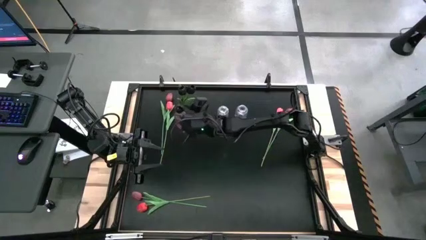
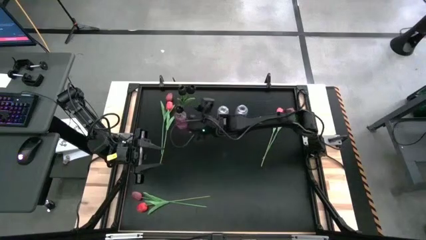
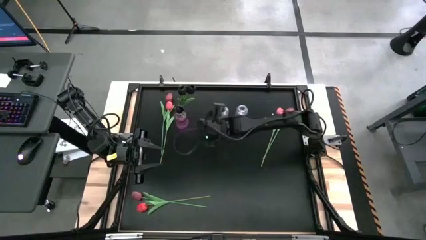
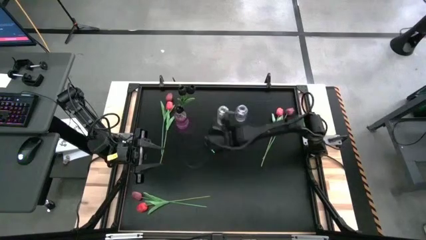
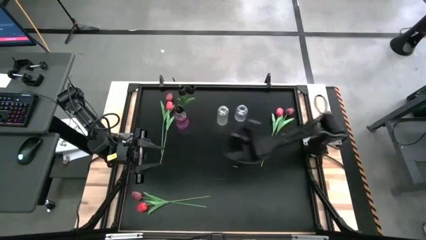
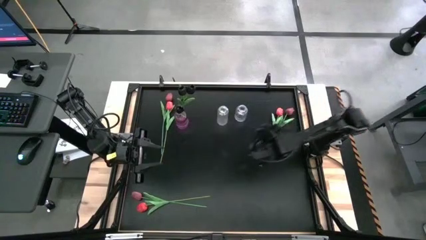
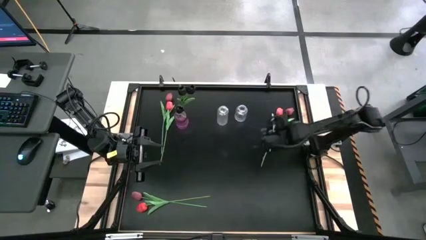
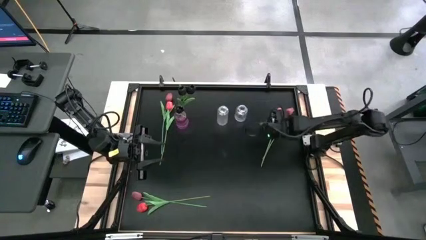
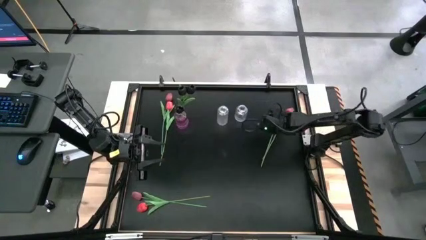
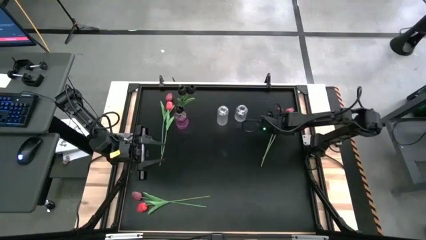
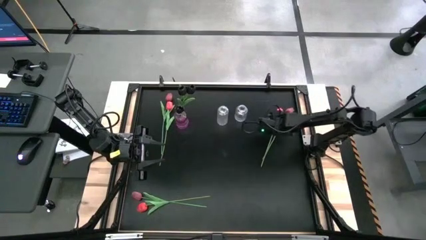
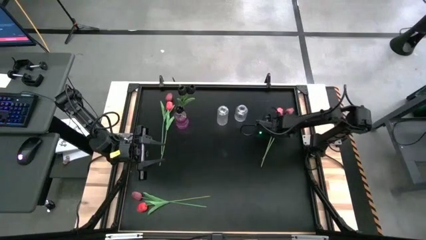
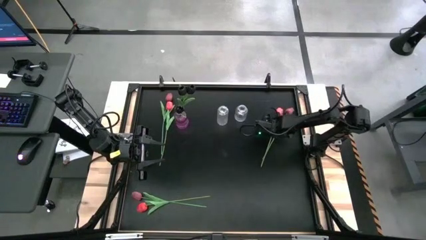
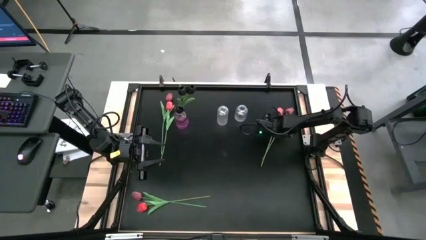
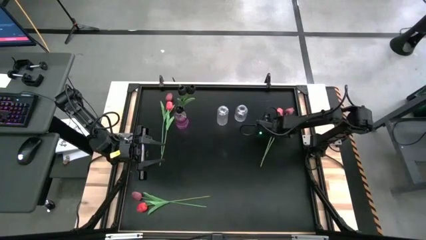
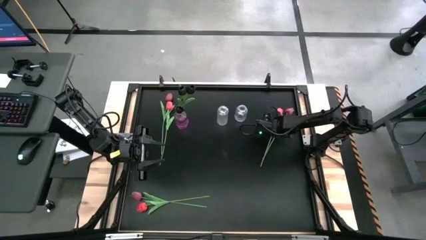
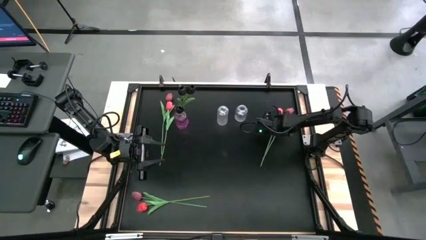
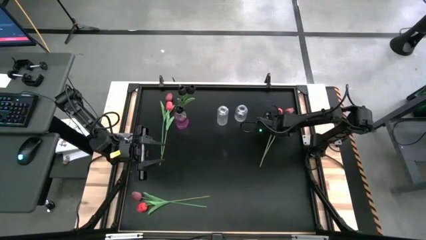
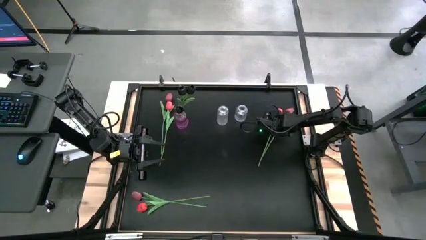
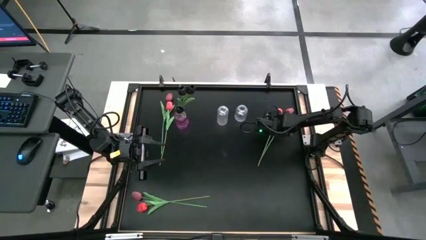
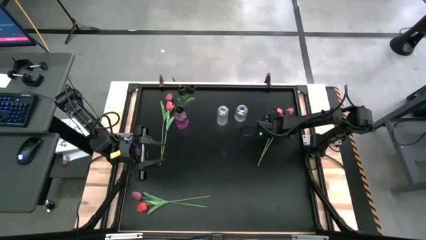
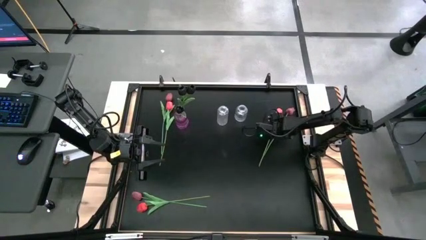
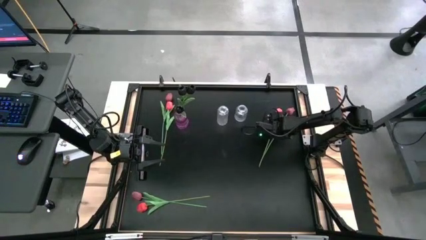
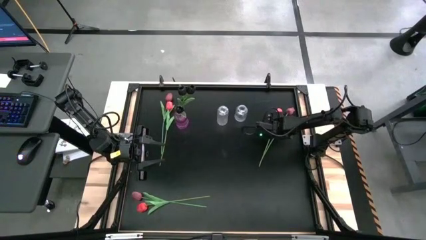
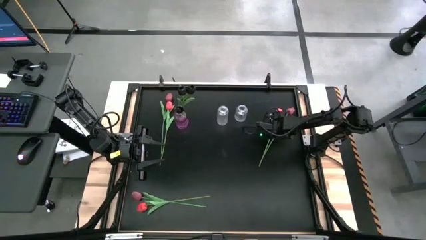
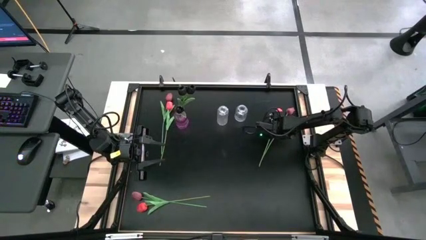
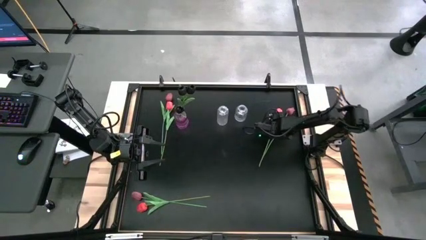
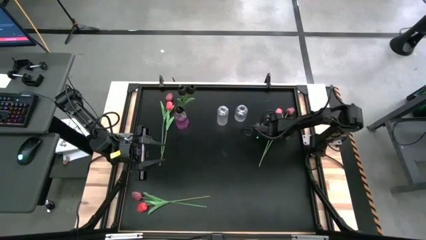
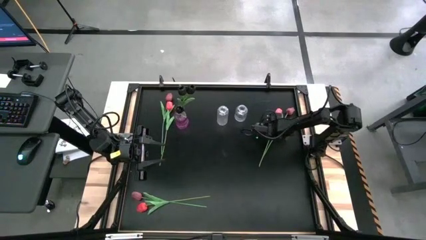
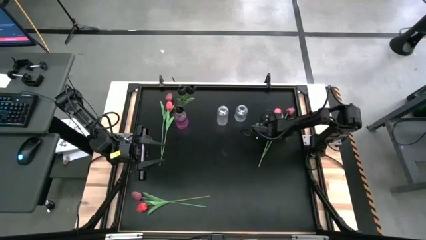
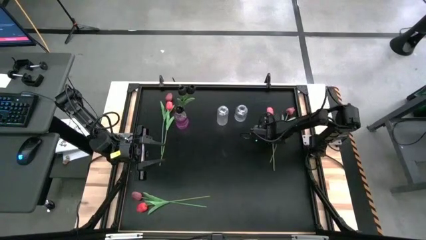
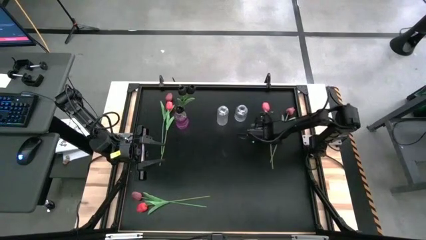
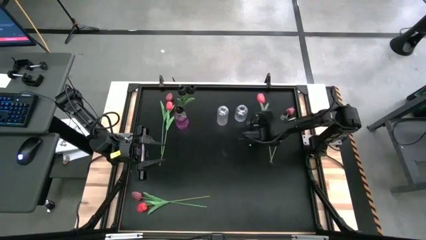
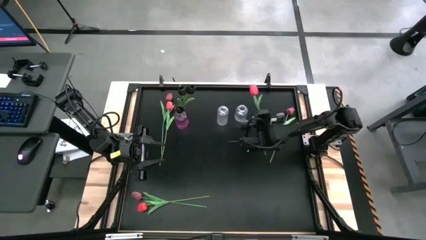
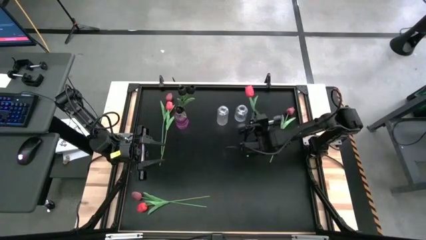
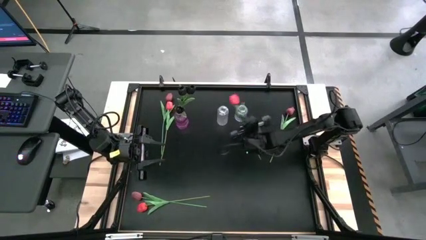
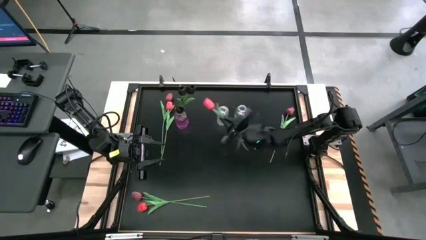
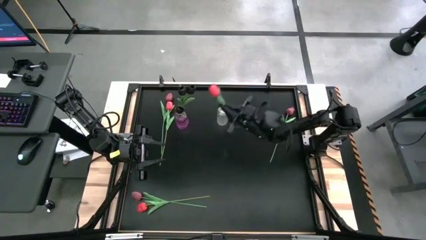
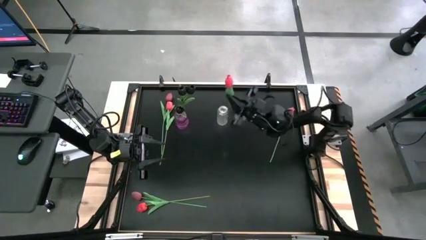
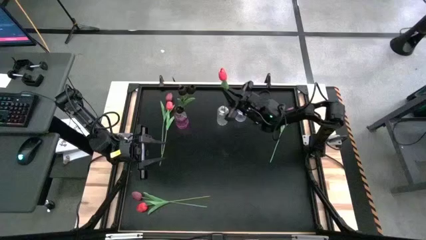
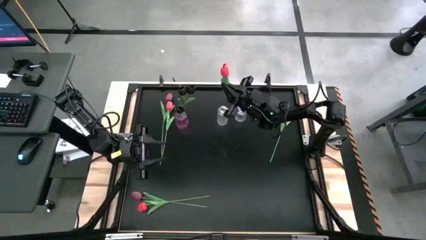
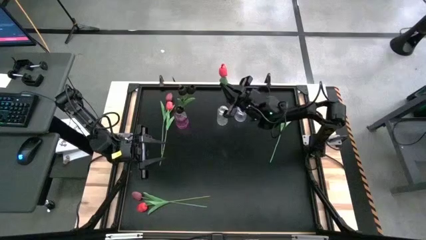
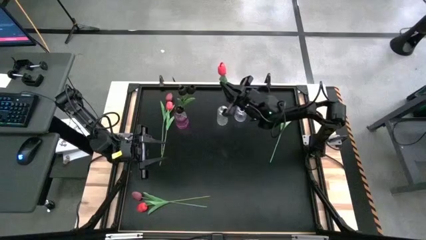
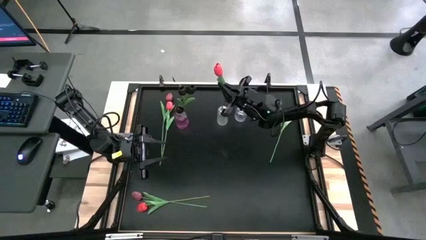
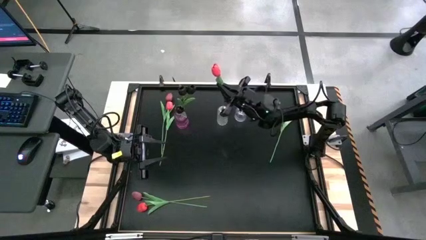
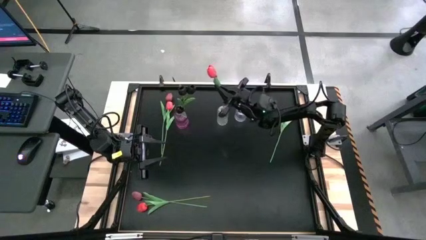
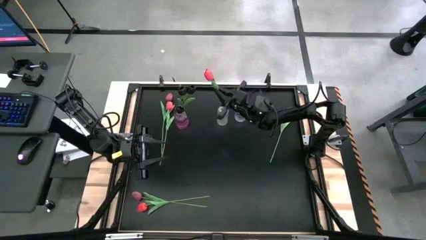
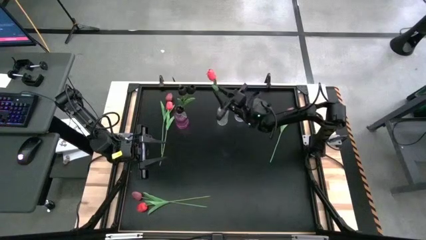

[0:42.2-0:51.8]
Task: Sort flowers into vase by color
Put the top right pink flower into the left transparent vase

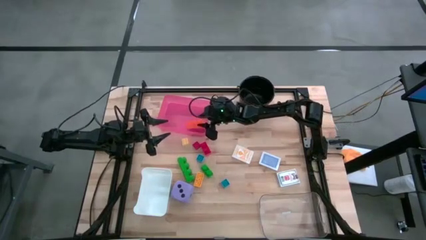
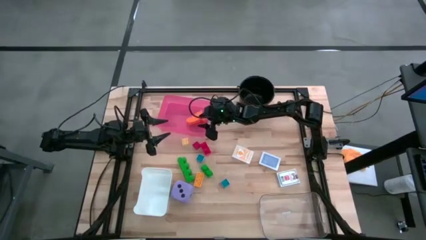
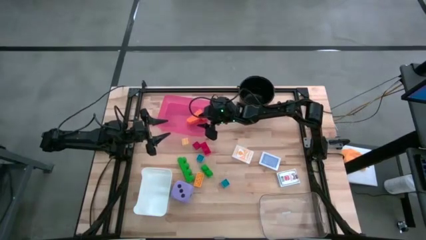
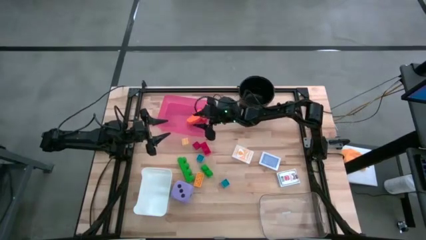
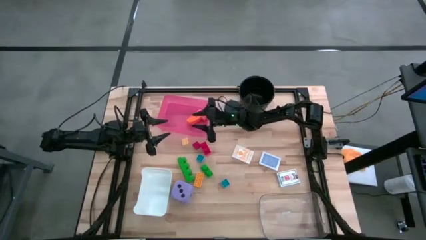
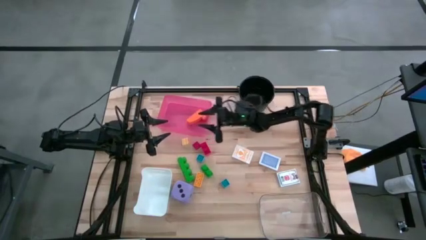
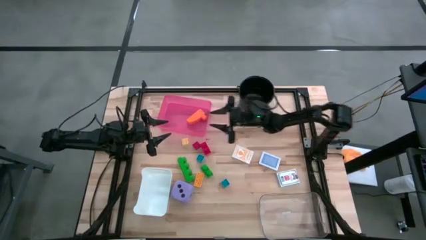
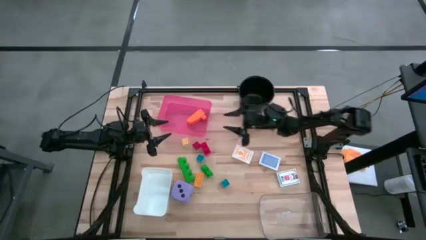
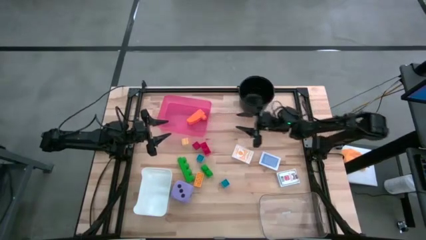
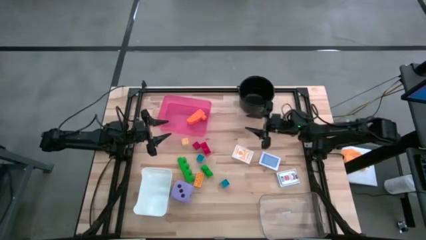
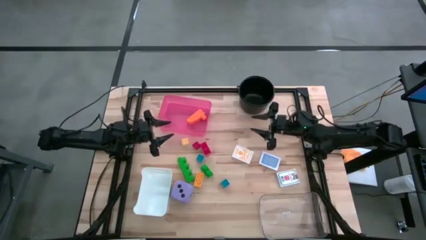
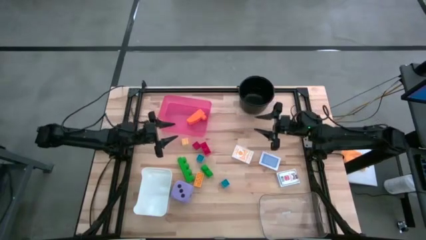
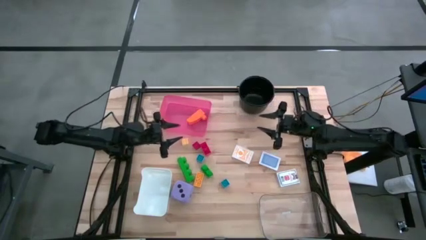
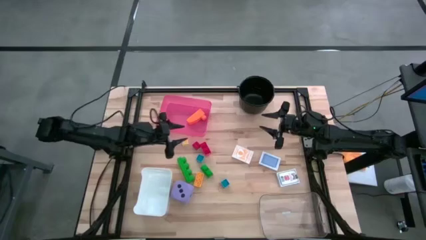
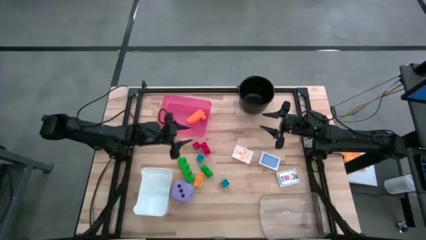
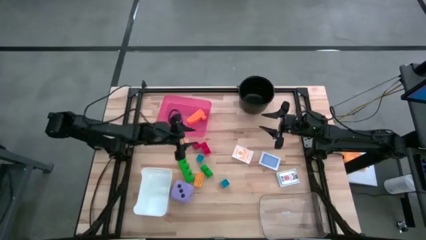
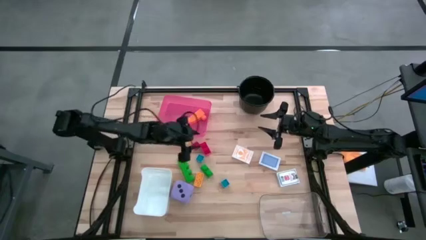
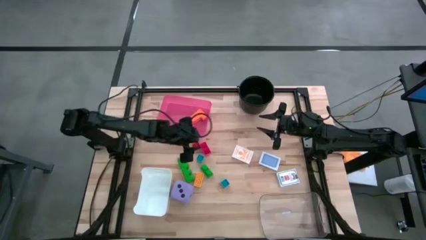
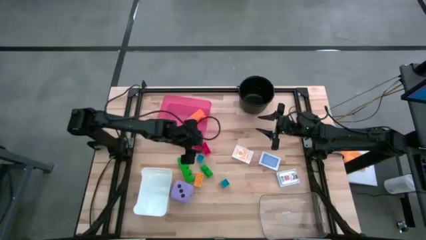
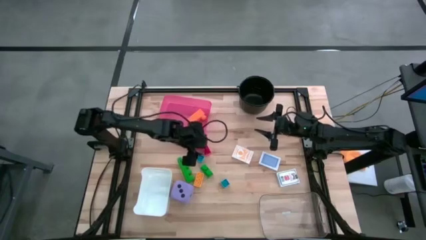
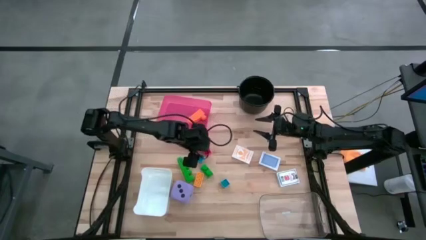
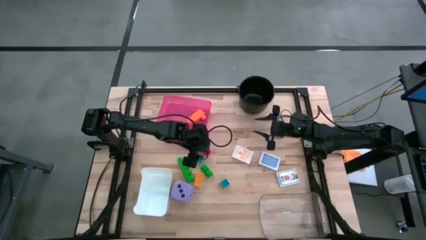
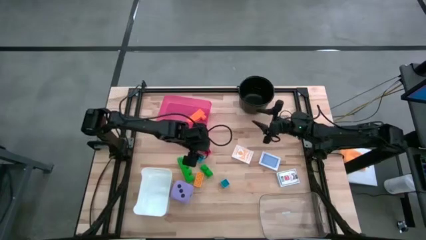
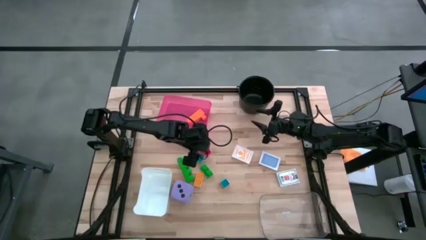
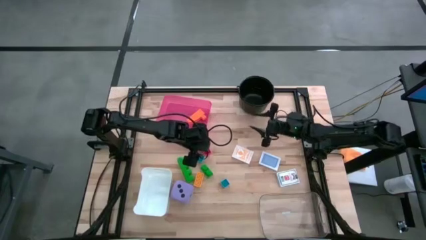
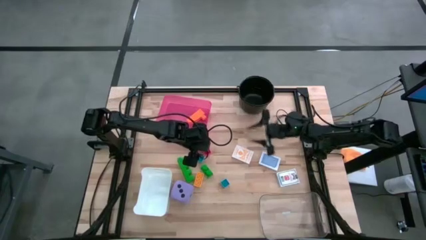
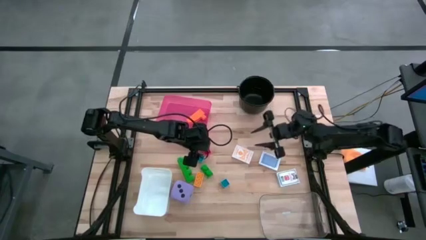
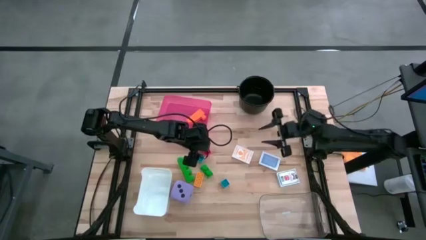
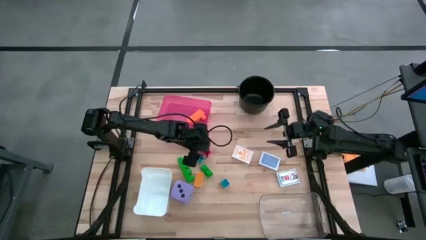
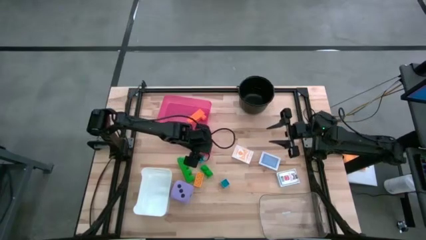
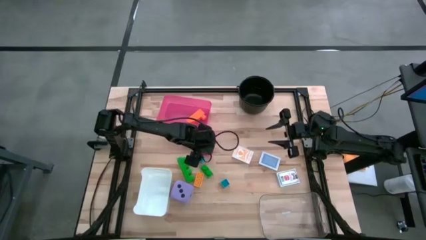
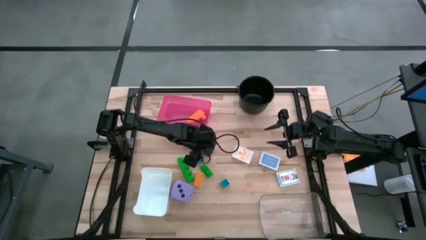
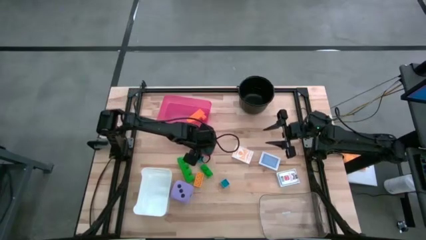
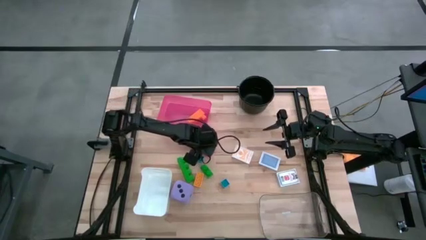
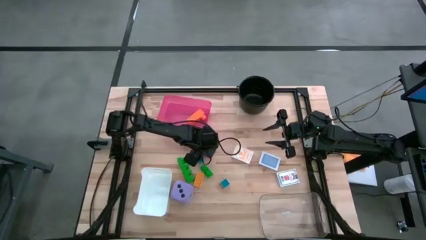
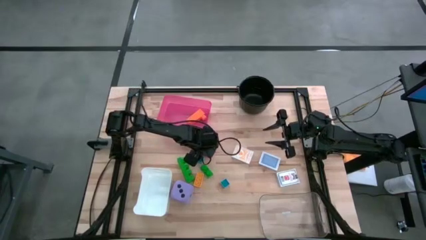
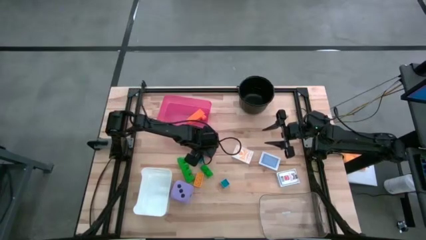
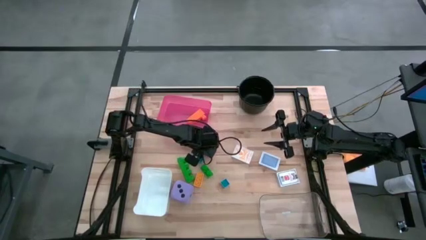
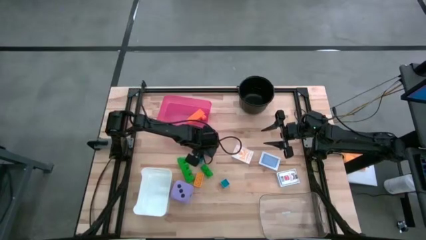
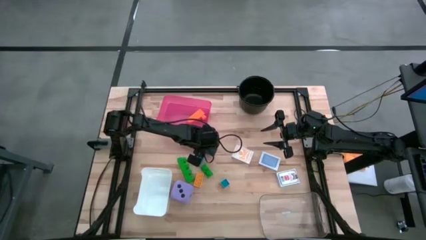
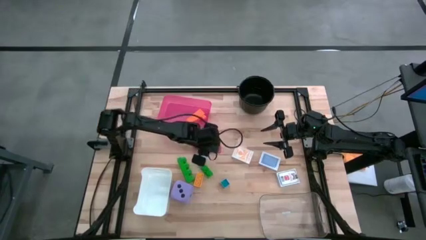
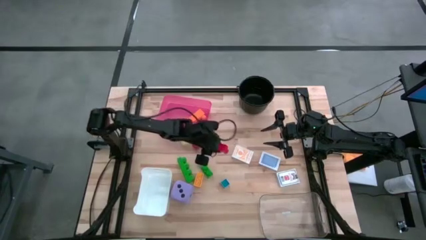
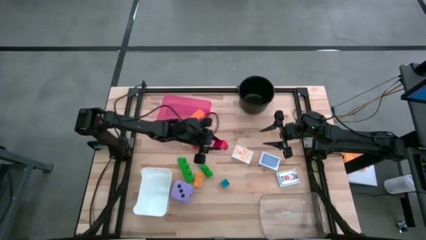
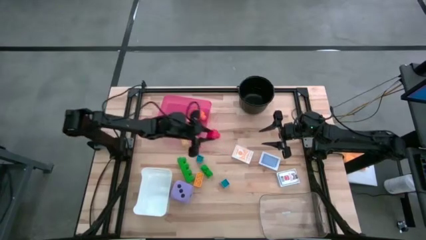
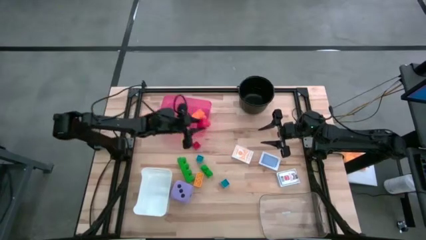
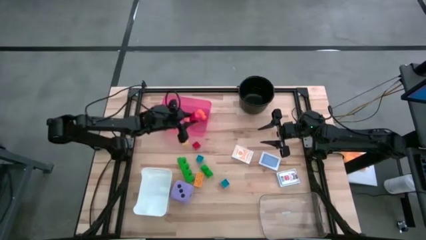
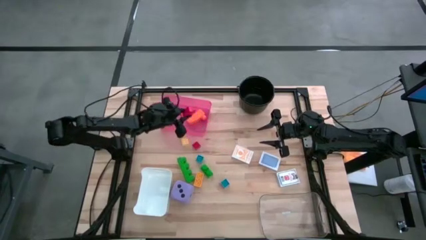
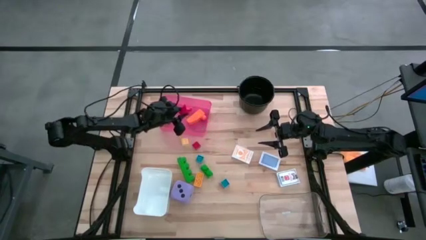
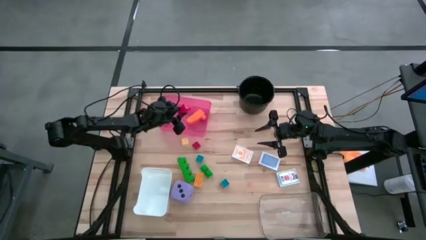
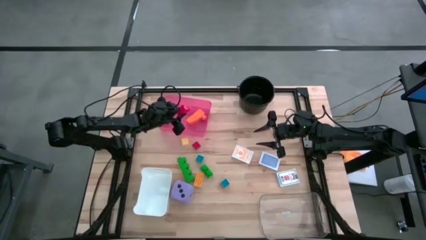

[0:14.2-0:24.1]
Task: Pick & Place Toys
Put the right red game piece into the red bin
